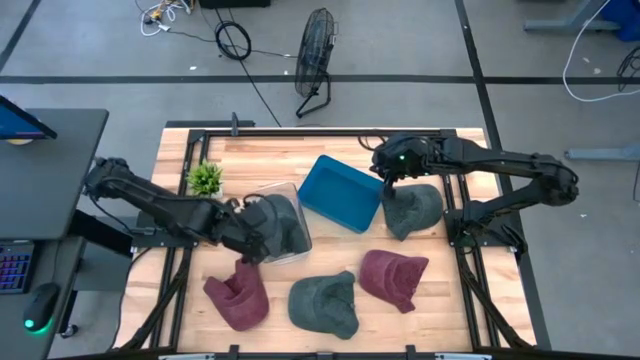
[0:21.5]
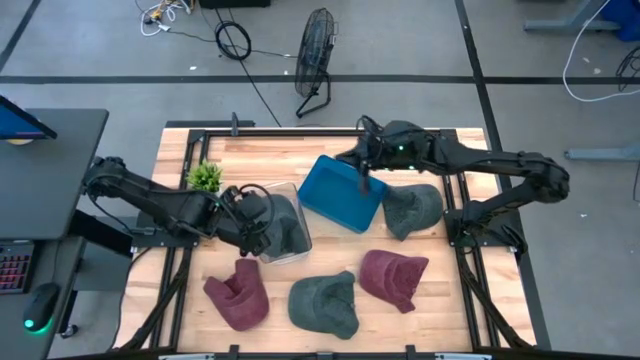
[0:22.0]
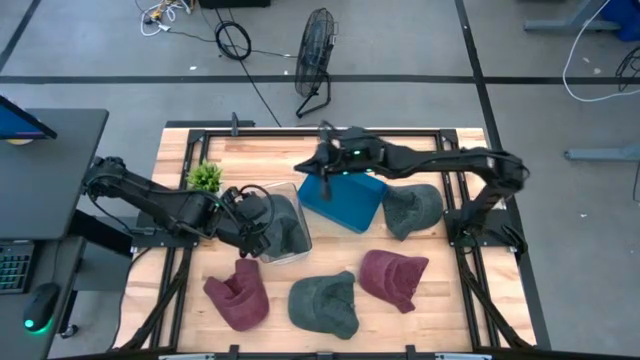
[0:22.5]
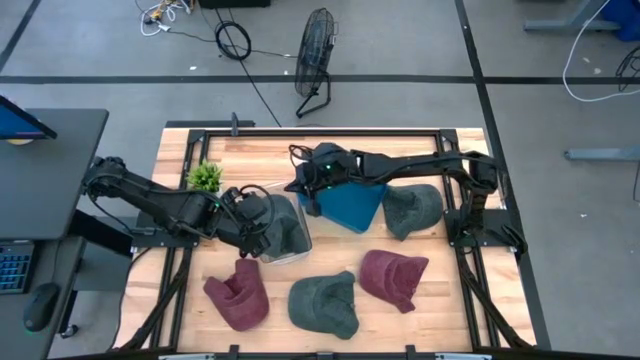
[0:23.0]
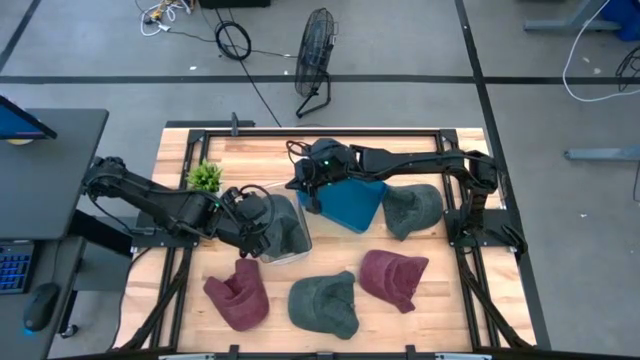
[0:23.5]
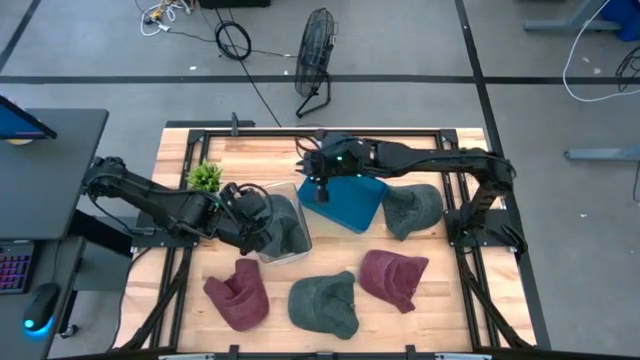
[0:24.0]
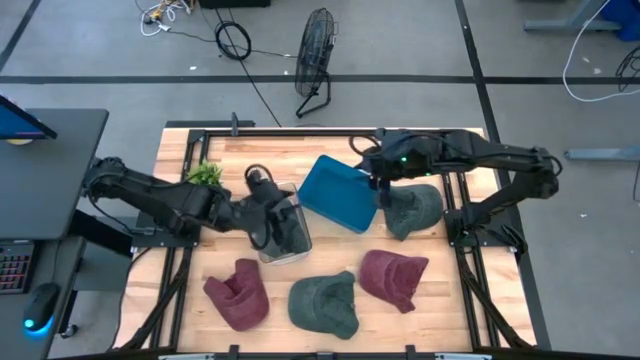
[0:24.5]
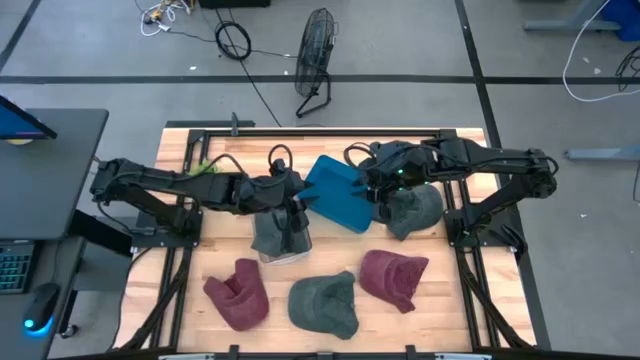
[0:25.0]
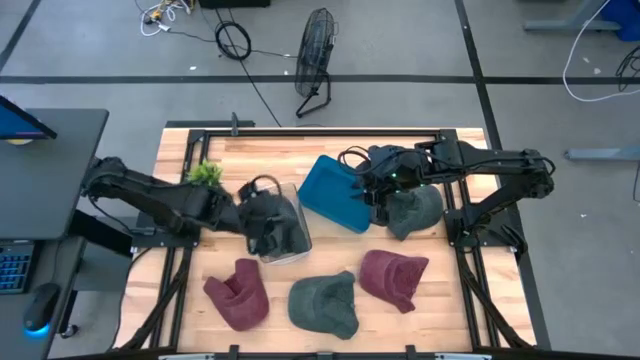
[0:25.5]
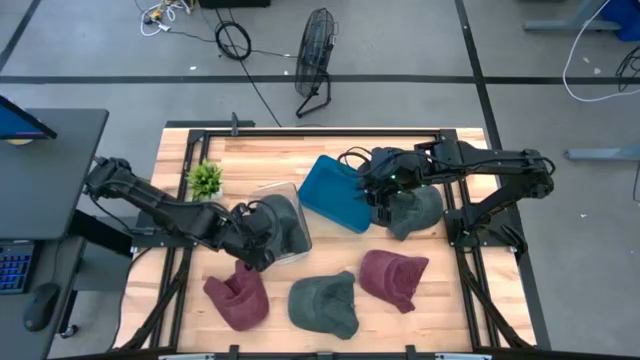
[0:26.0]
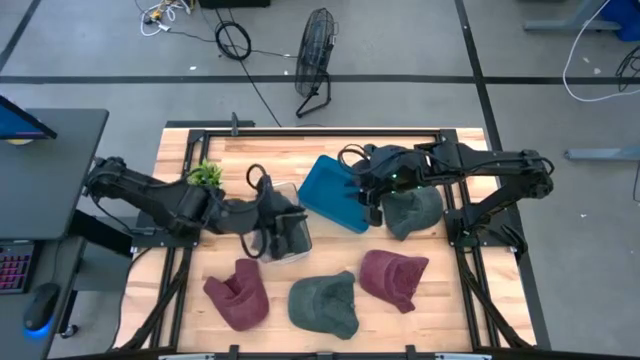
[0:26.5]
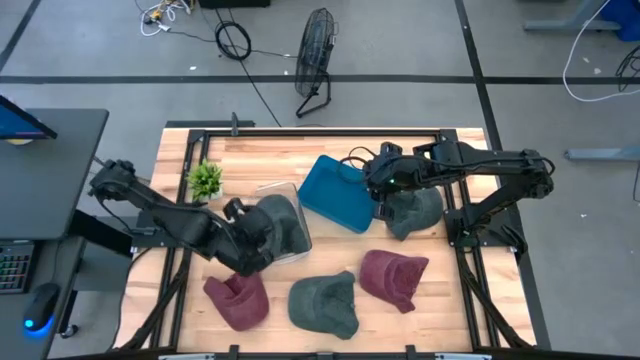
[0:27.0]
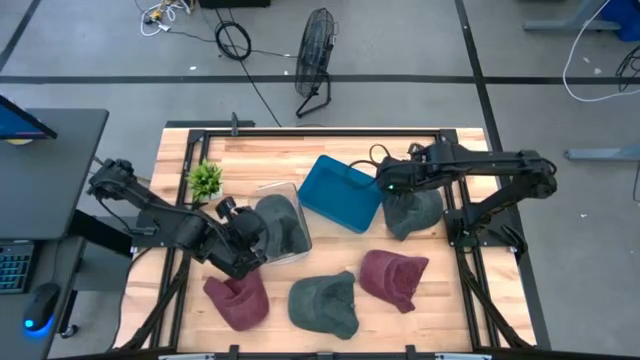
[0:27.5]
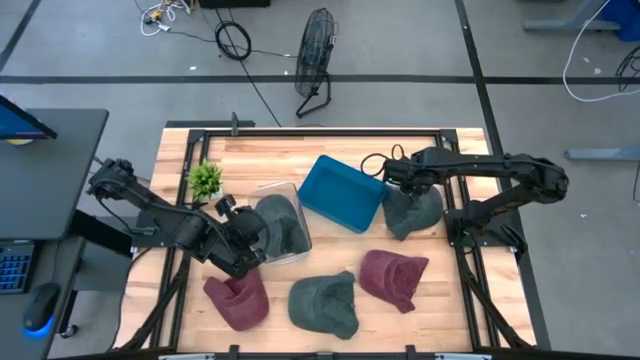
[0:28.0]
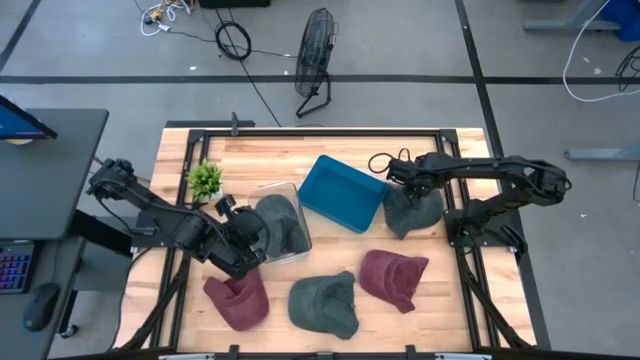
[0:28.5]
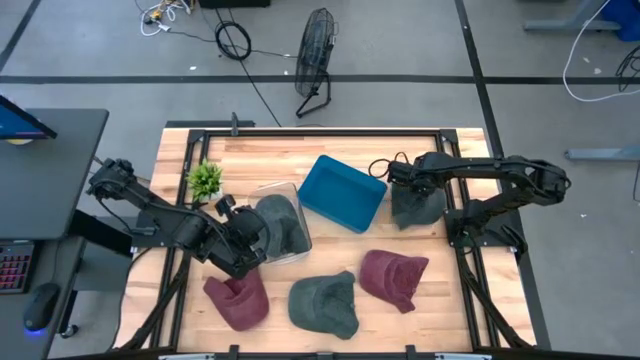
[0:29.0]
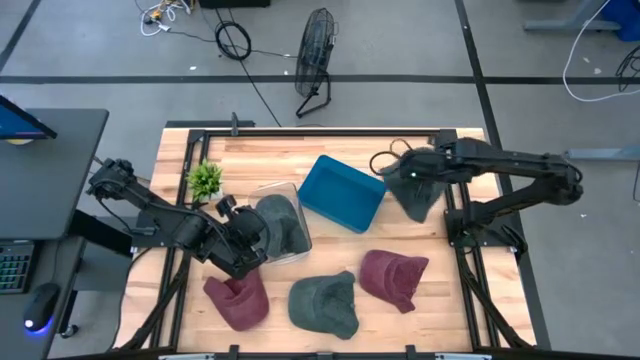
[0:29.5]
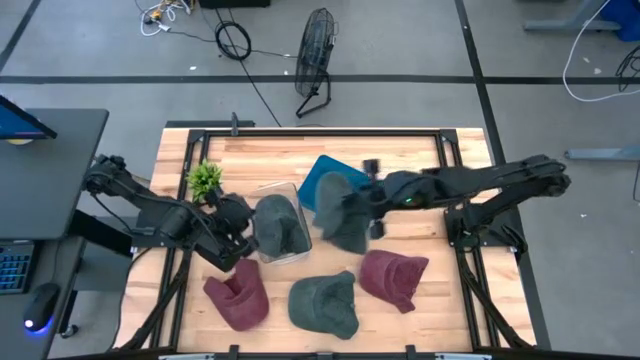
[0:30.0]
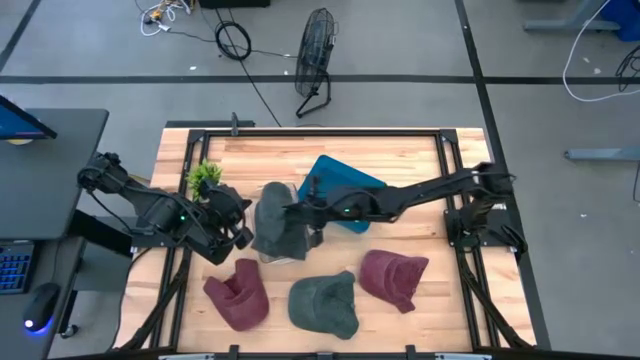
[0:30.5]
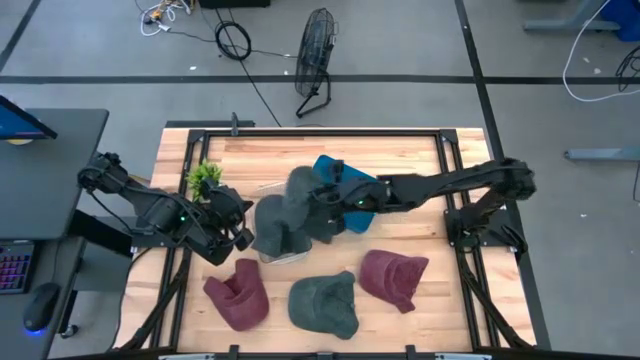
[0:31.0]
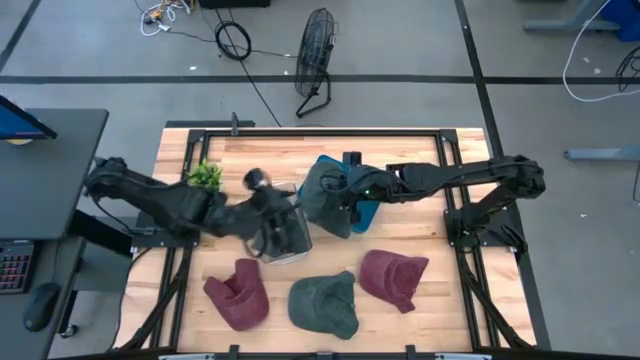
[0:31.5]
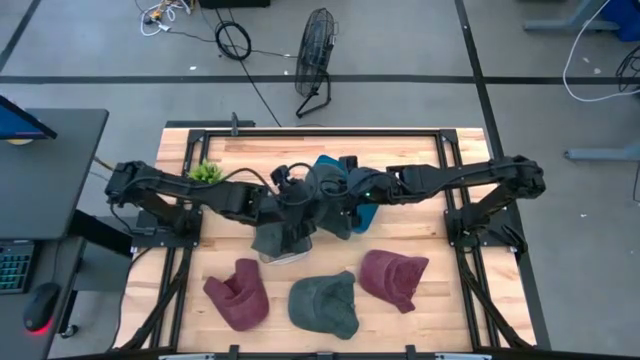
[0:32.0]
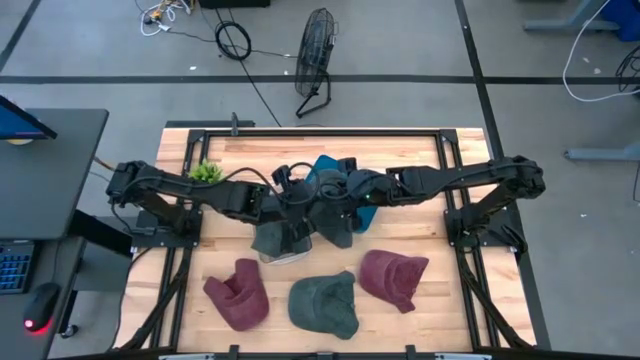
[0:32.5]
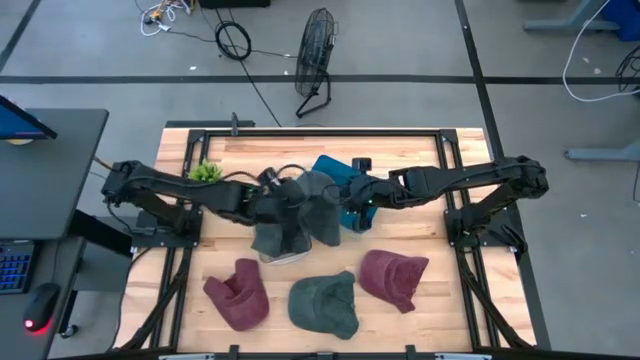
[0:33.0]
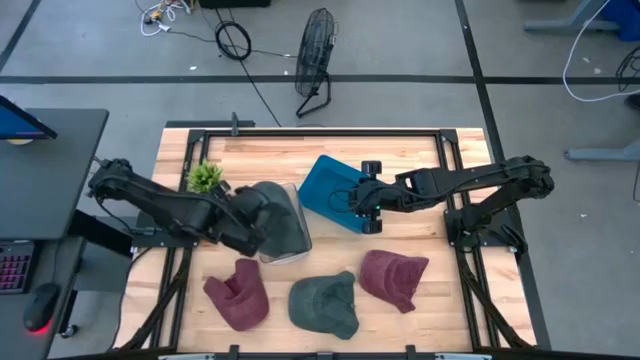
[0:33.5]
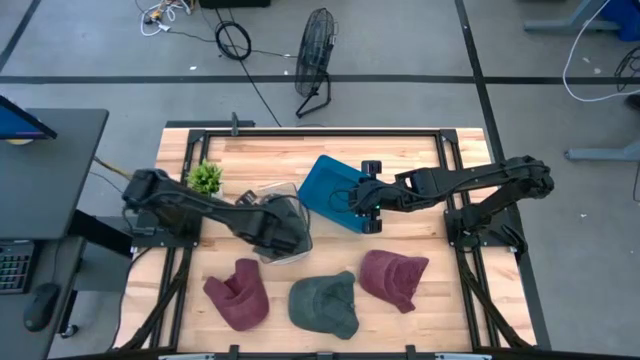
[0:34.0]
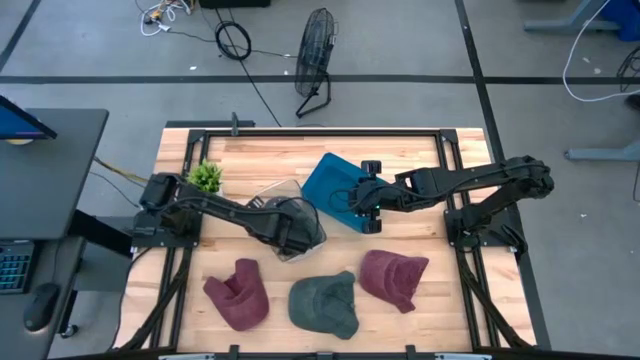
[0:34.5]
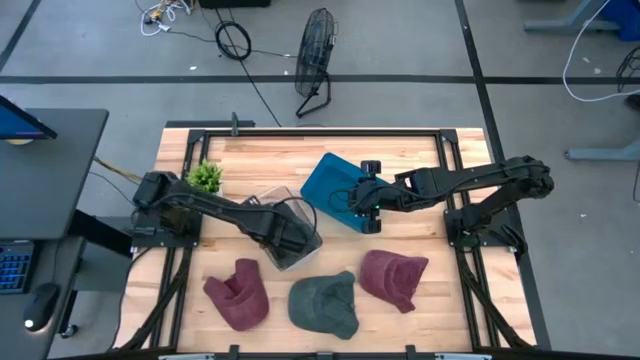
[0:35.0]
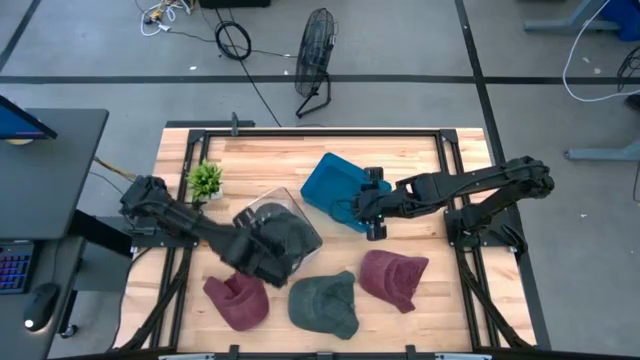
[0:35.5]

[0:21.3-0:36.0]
Task: Pick & Place hat
Put the top gray cap into the transparent bin

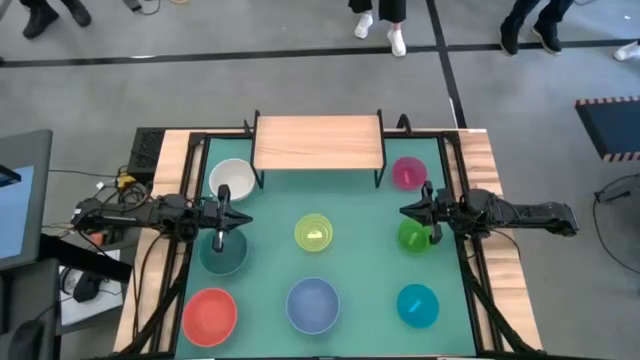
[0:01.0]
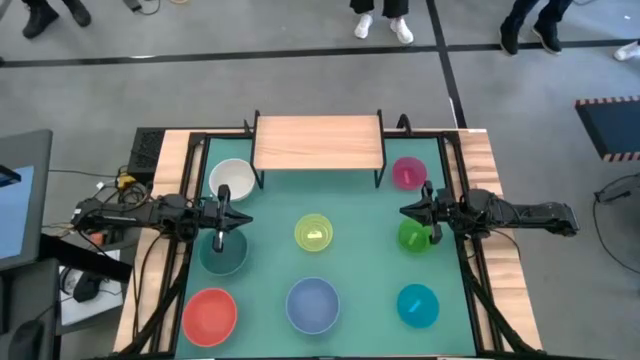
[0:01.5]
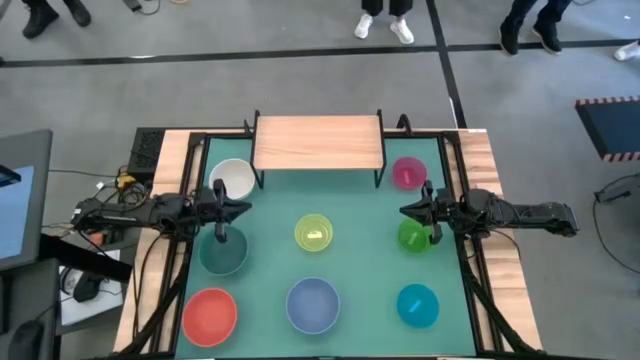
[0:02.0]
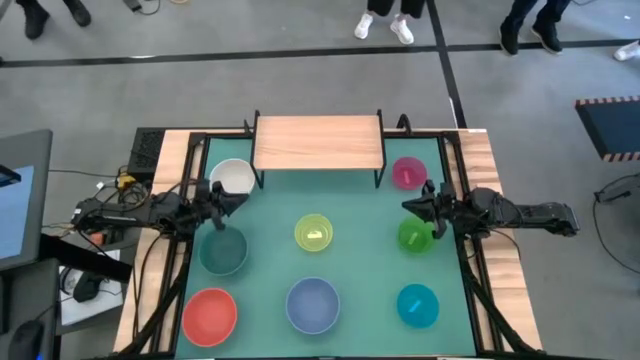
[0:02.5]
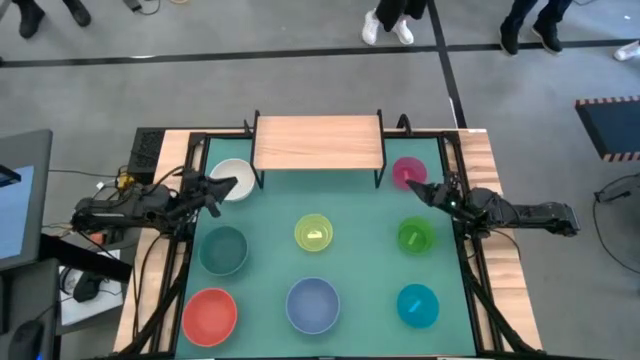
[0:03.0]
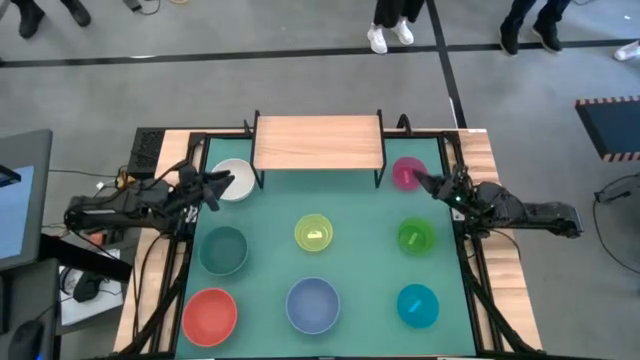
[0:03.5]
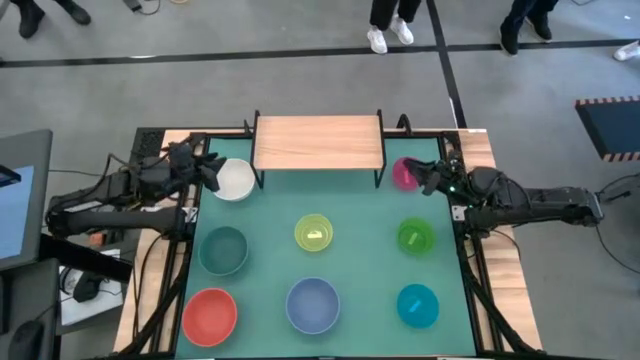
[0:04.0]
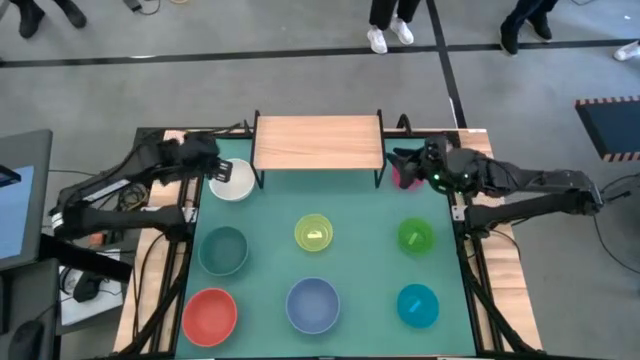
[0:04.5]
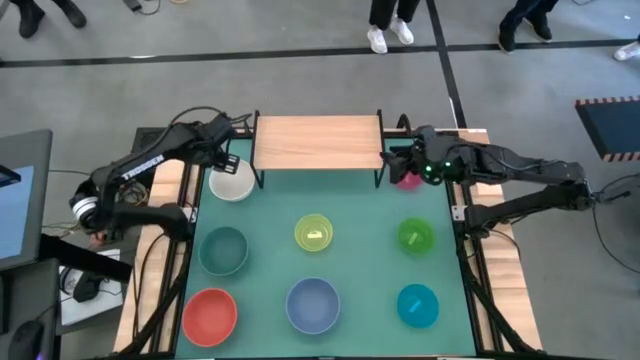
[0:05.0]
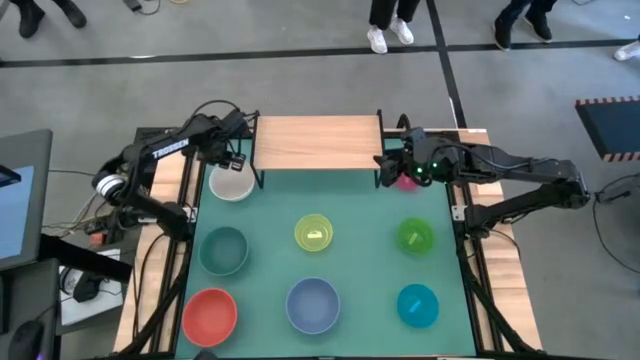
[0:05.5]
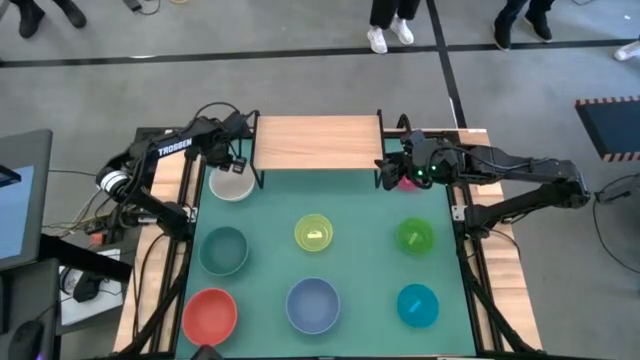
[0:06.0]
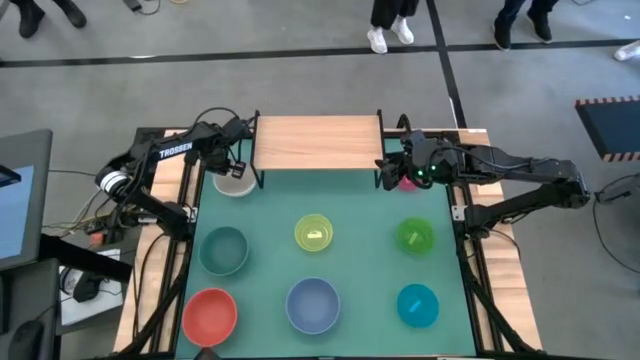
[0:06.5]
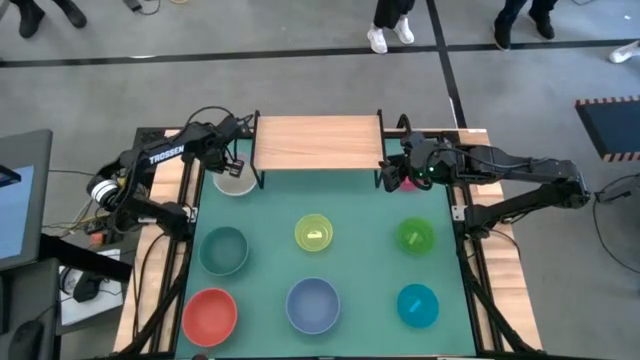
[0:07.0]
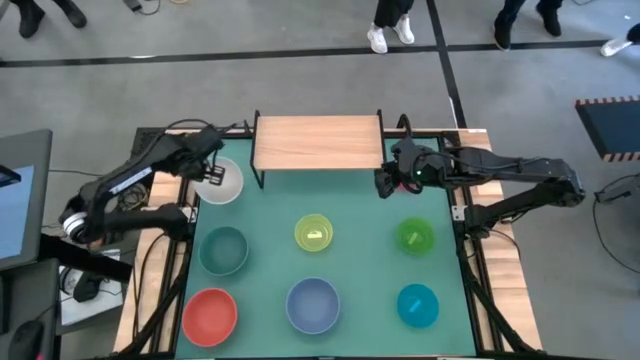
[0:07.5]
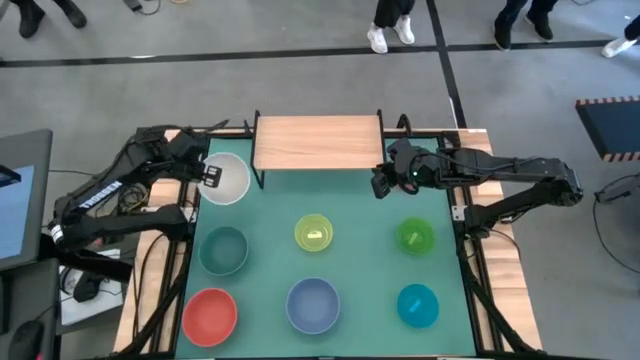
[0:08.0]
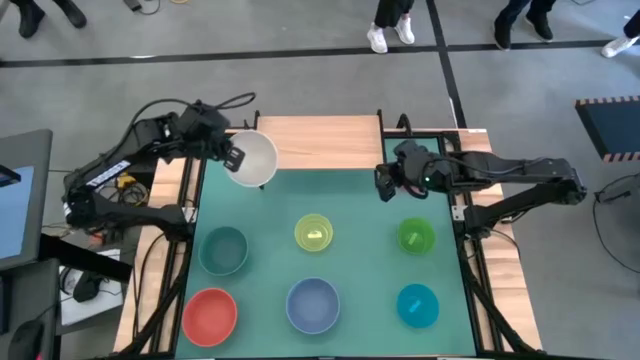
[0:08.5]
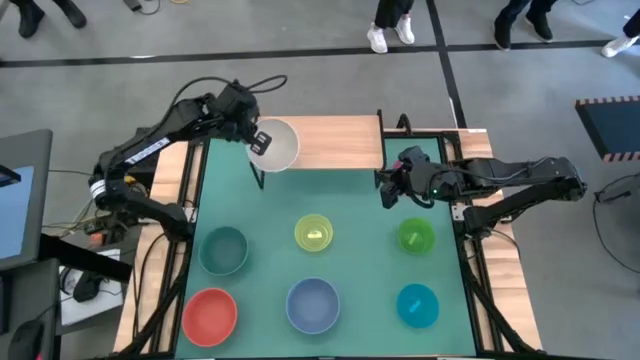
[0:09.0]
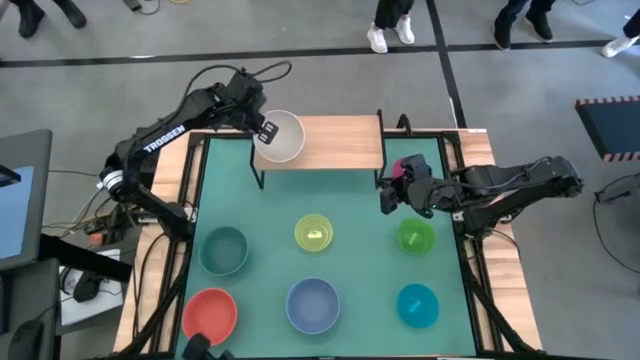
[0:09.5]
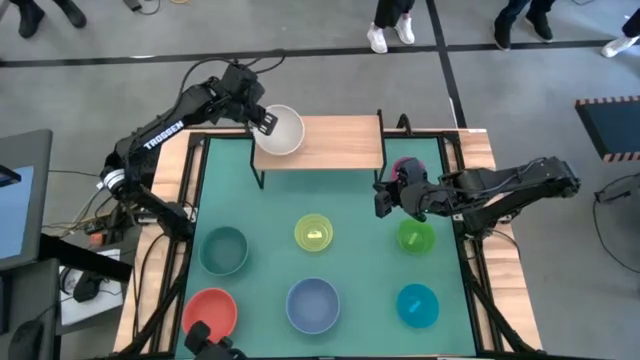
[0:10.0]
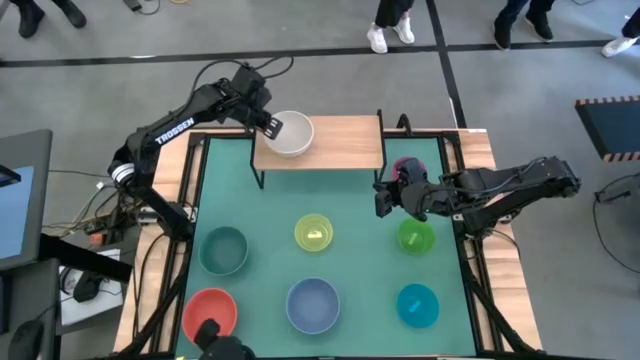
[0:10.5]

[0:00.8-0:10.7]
Task: Place and stack bowls onto a shelf
Put the large white bowl on the shelf
